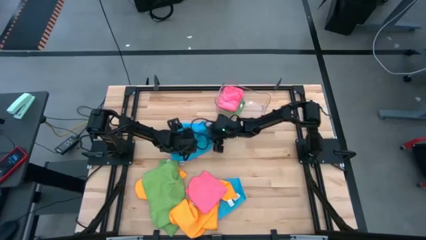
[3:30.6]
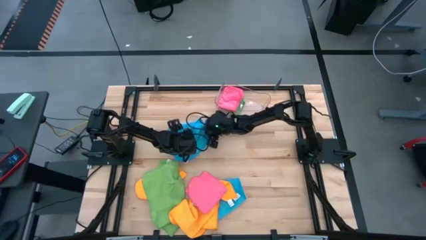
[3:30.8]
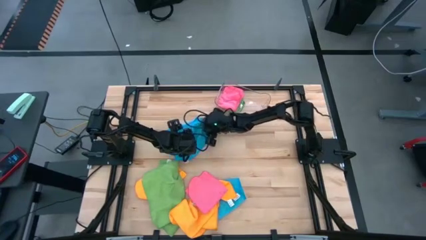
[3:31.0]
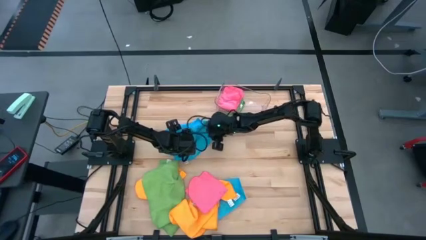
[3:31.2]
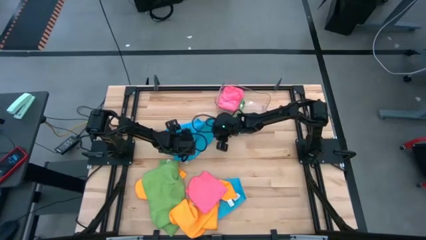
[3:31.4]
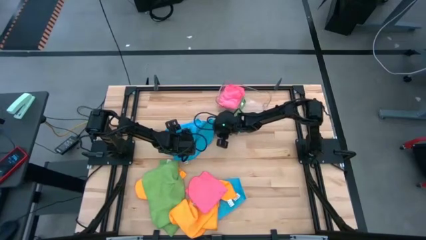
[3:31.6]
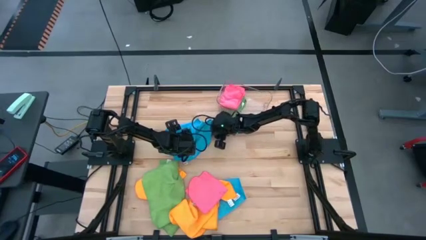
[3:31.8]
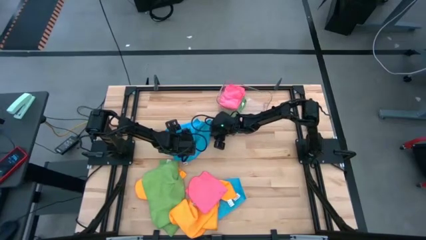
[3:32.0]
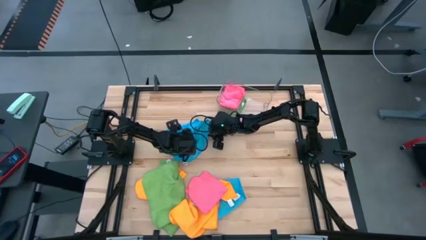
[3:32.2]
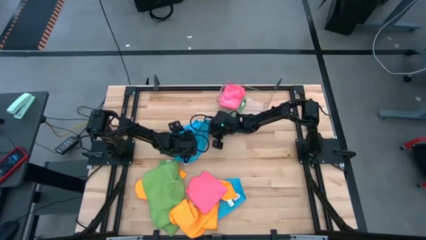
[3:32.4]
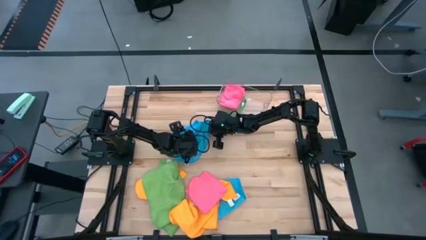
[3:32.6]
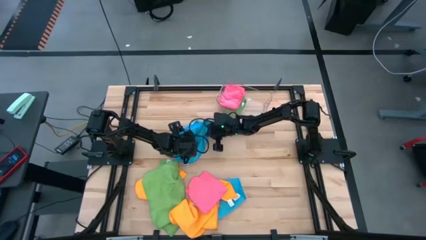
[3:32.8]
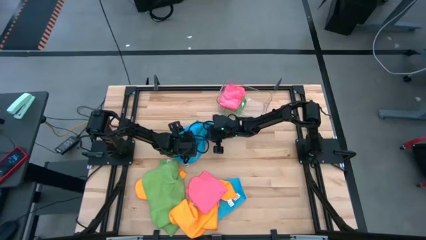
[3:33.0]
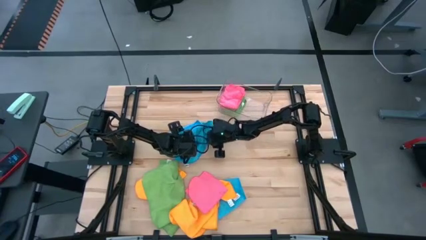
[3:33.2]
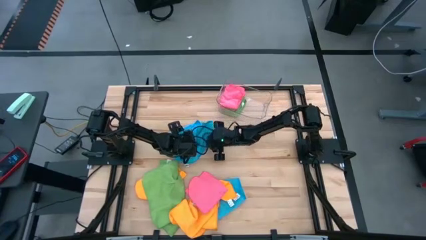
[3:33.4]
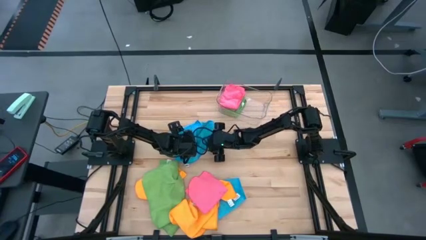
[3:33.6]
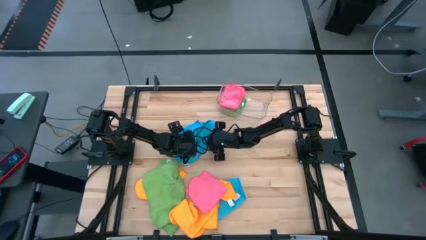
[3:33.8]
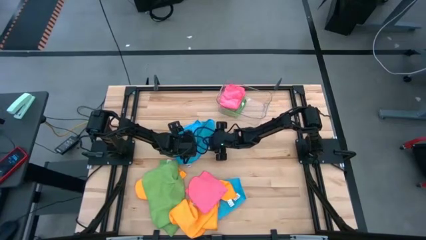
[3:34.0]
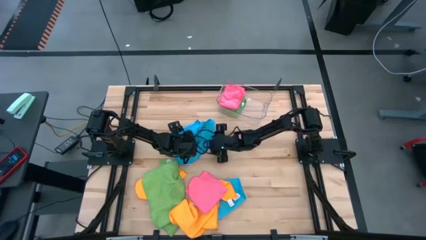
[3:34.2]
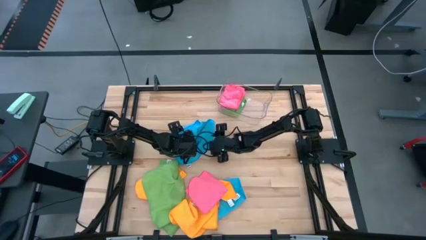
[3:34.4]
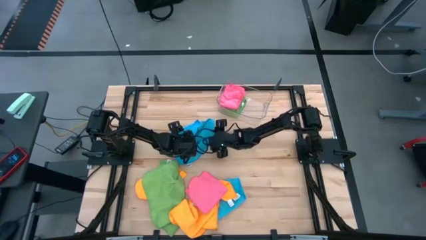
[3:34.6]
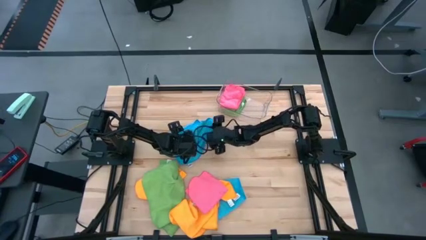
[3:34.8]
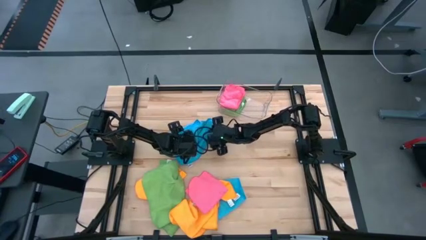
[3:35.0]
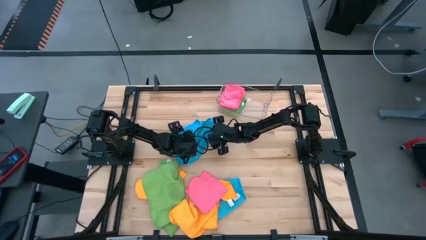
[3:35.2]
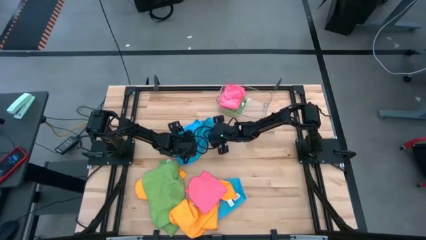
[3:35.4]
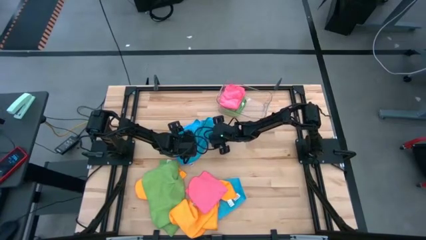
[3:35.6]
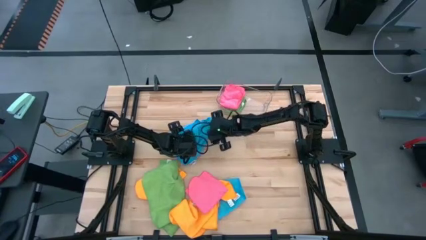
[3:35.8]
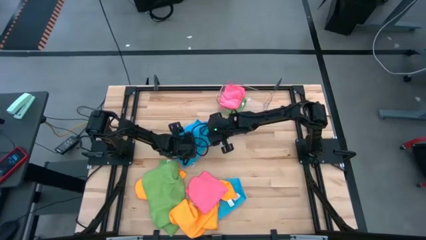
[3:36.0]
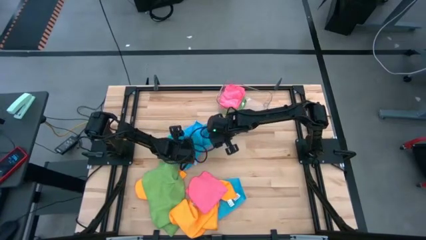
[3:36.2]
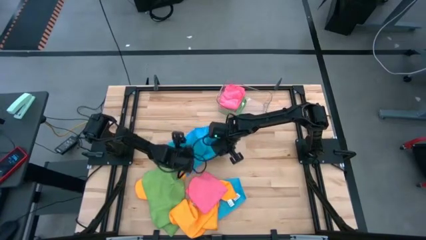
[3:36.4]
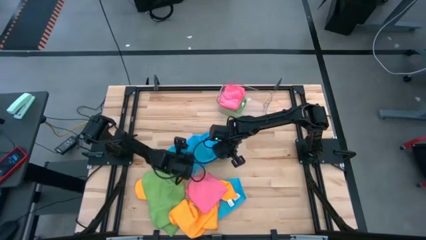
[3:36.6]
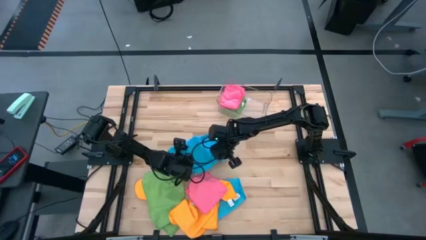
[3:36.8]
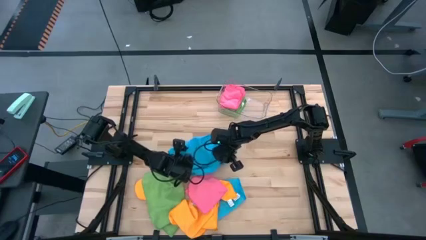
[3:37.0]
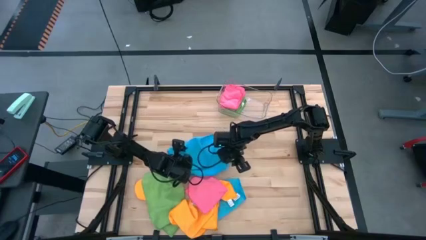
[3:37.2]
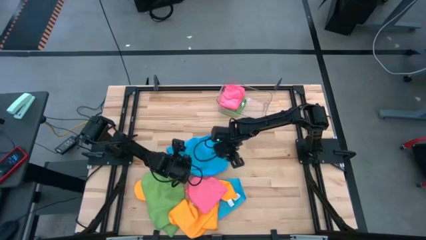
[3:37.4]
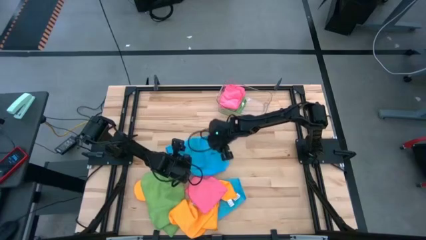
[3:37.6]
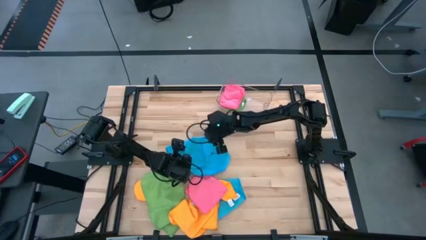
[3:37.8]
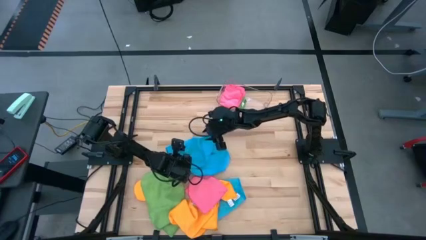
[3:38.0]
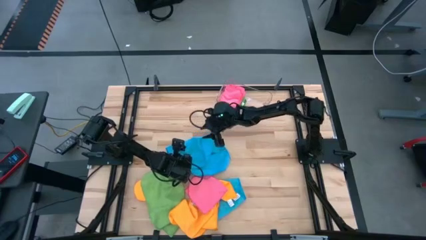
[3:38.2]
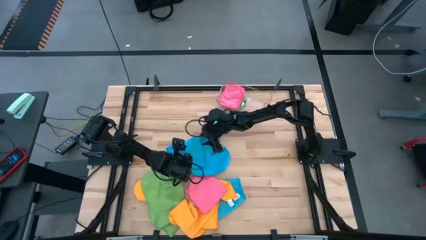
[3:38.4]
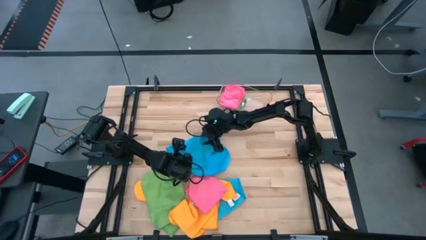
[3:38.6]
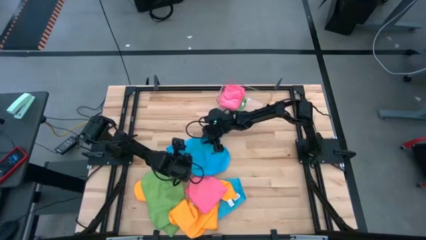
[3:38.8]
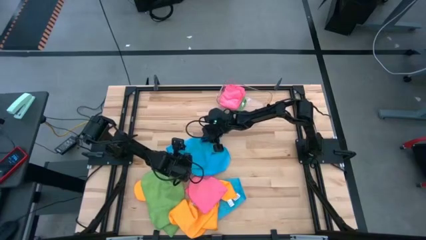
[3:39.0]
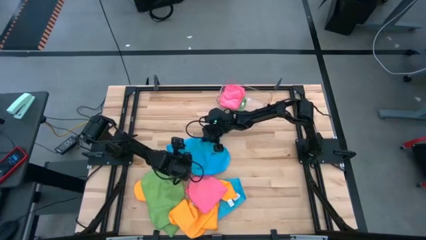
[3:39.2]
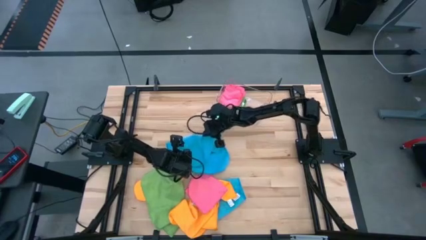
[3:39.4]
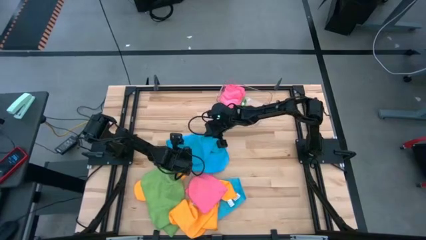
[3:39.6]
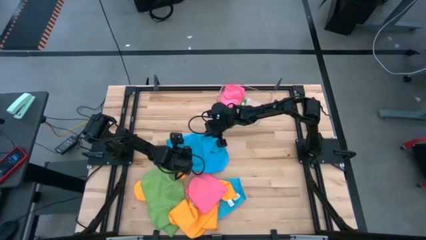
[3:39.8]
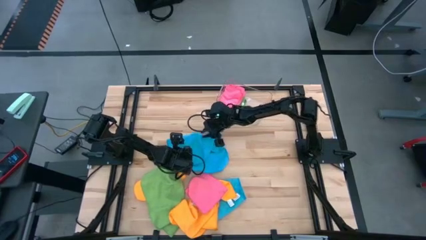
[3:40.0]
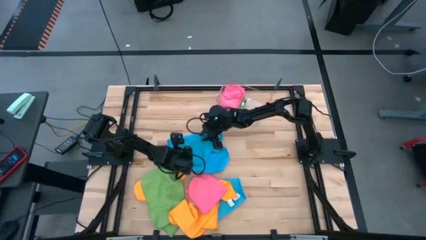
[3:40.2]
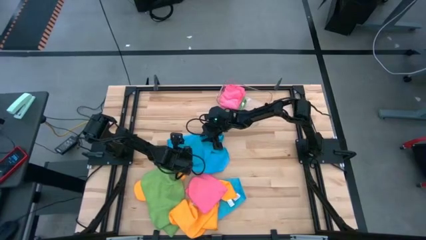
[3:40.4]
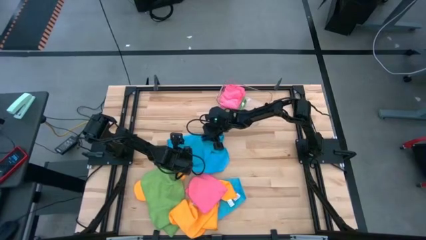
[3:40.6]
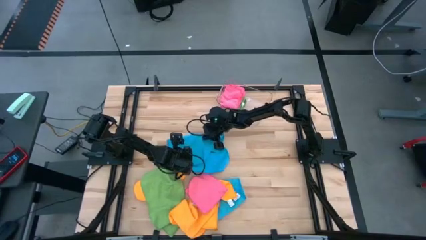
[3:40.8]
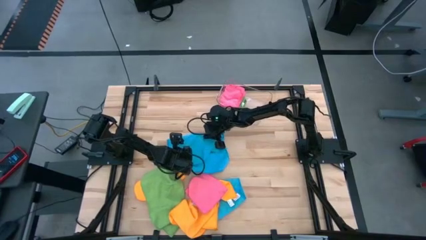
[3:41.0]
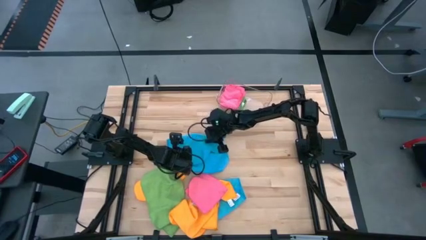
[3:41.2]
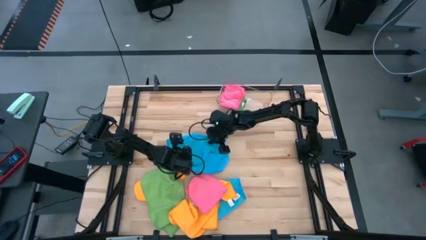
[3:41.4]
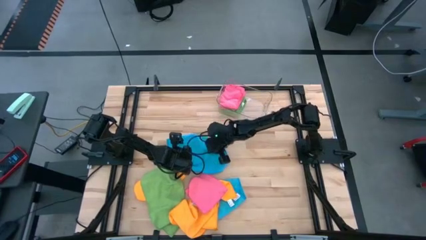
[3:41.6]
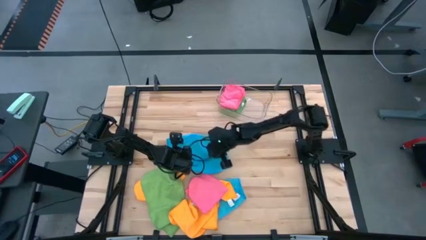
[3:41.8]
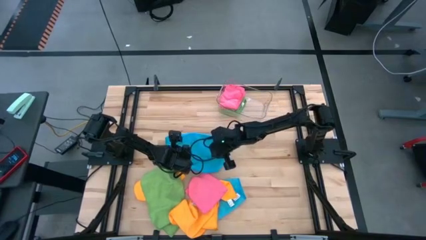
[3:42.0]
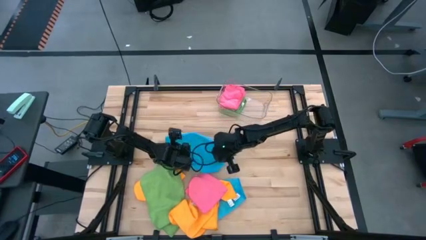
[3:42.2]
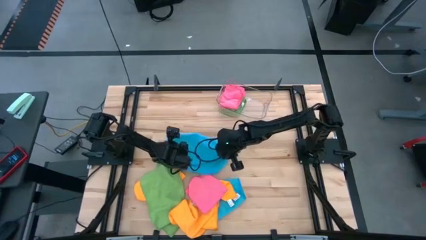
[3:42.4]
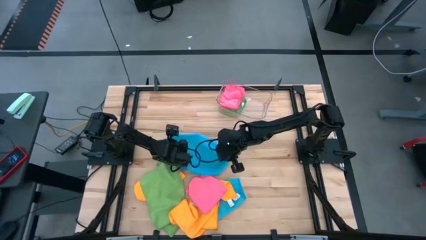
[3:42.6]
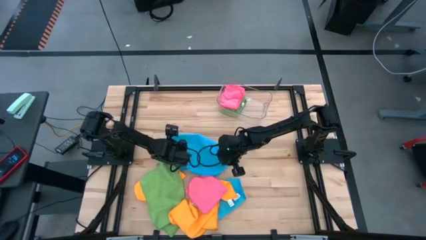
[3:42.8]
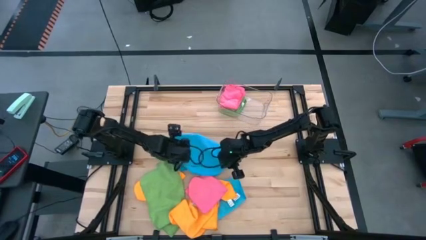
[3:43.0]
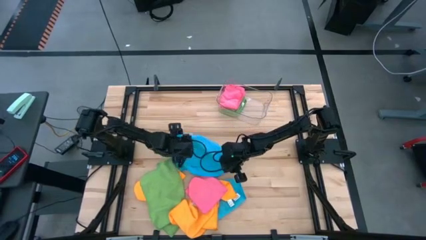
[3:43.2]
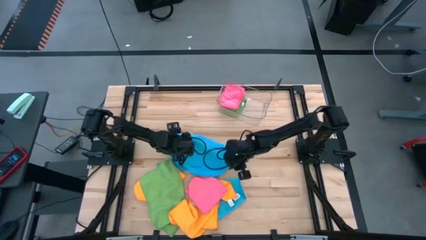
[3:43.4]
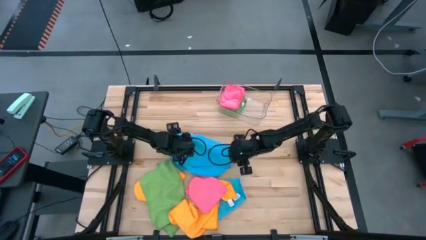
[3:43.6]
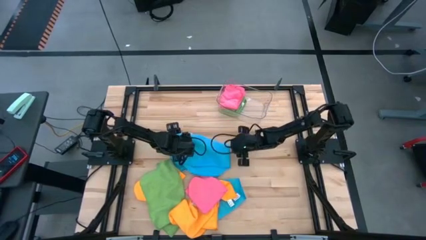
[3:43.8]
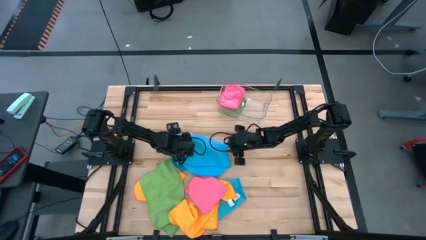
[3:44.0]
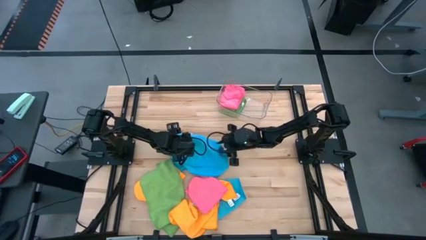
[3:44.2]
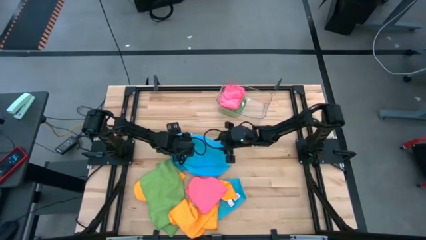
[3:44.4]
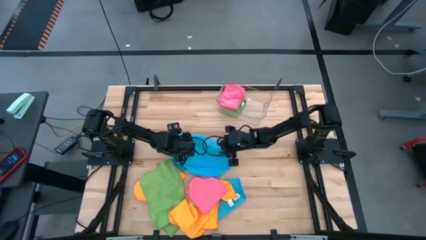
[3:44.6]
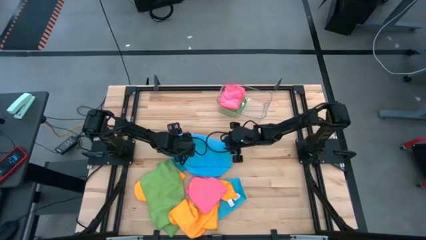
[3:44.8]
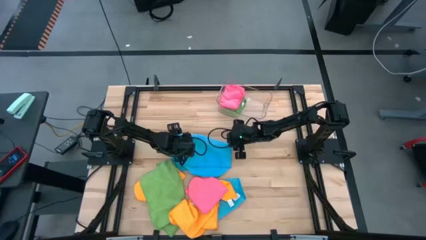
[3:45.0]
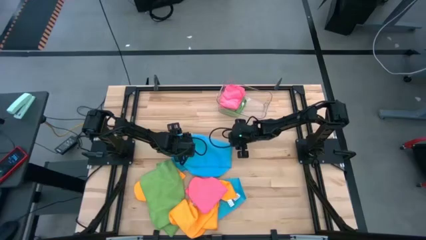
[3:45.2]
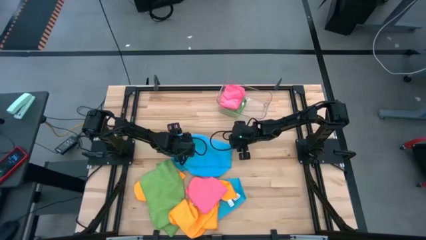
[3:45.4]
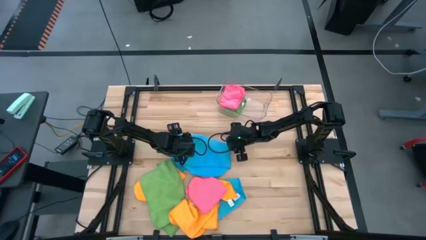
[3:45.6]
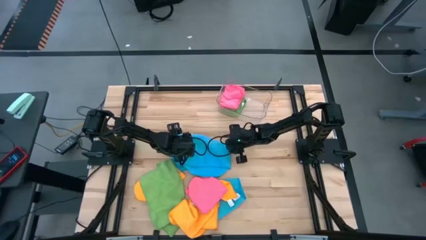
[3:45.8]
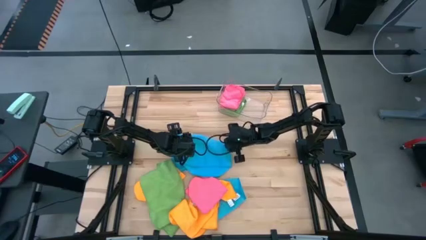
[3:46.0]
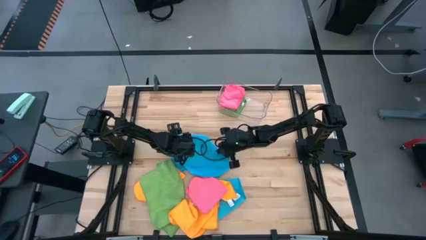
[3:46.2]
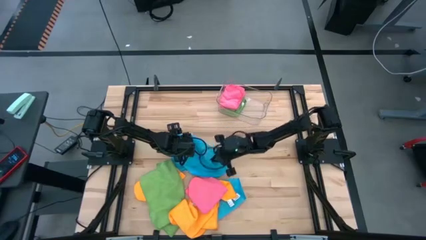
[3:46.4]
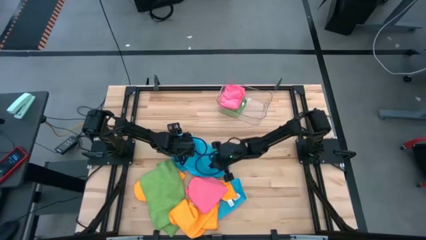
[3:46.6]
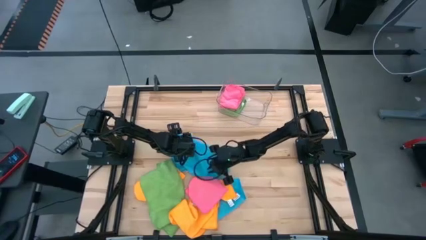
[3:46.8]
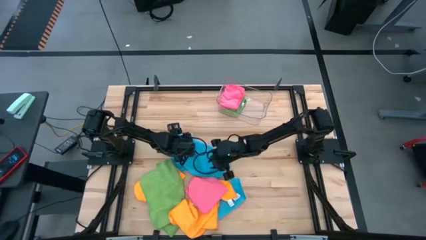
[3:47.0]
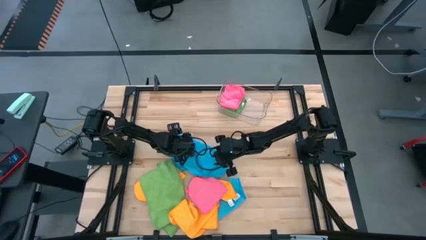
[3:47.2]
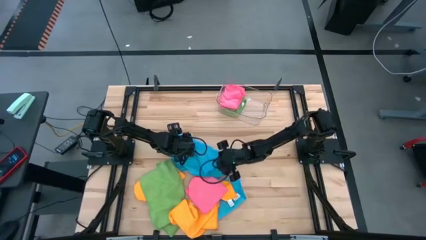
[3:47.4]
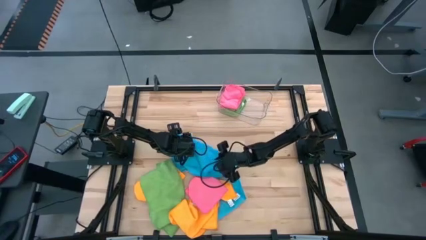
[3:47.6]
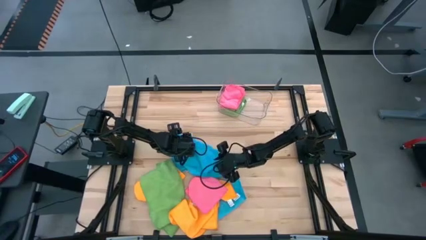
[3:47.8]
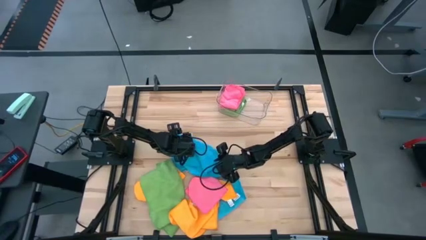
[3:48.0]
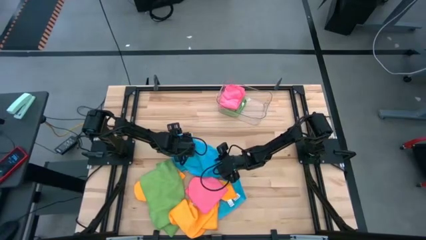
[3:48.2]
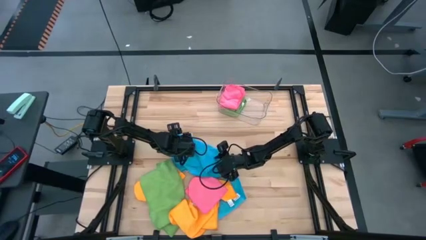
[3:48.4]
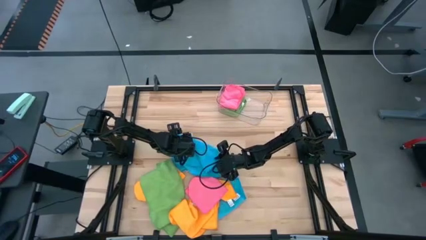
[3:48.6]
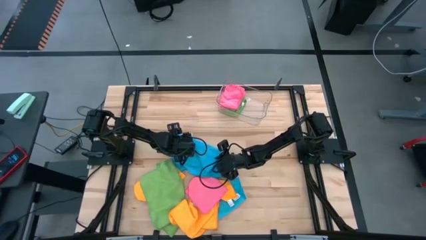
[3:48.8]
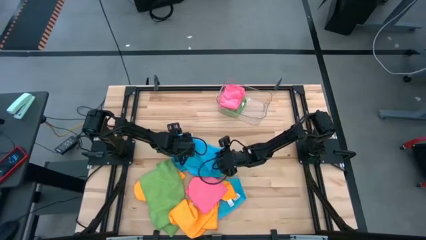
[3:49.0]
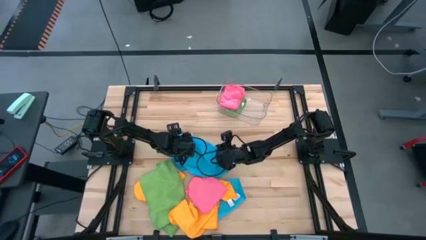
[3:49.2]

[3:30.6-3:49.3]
Task: Fold microfiber towels
Fold the top blue towel
